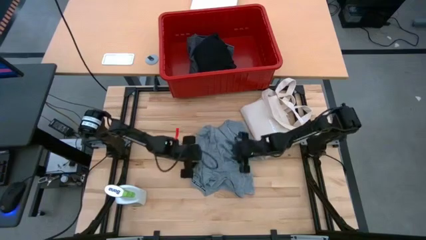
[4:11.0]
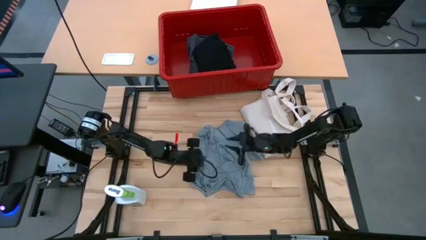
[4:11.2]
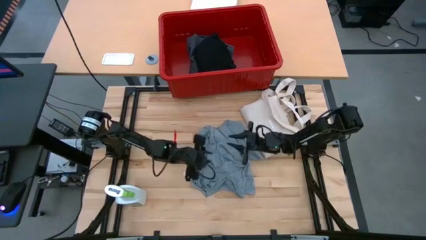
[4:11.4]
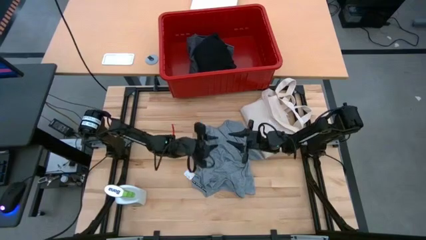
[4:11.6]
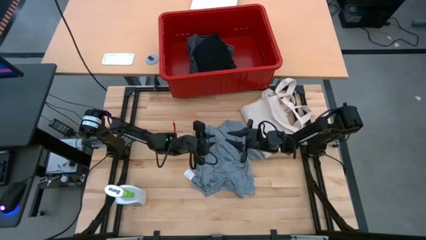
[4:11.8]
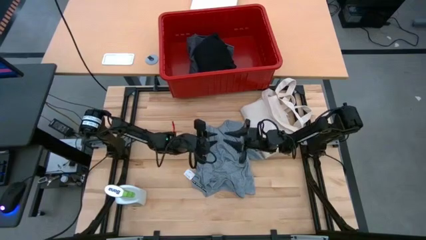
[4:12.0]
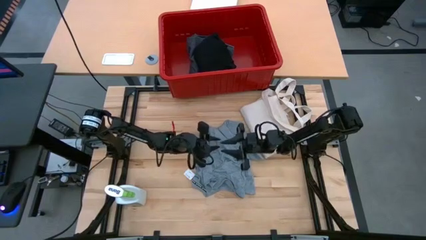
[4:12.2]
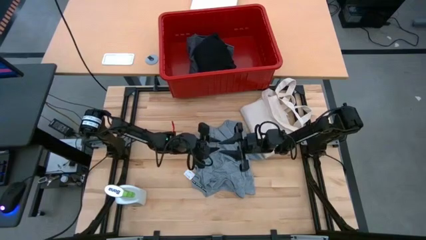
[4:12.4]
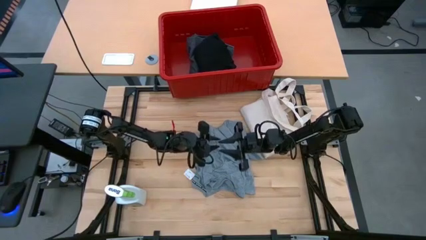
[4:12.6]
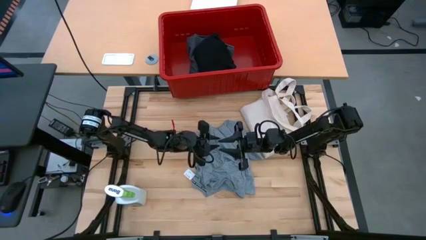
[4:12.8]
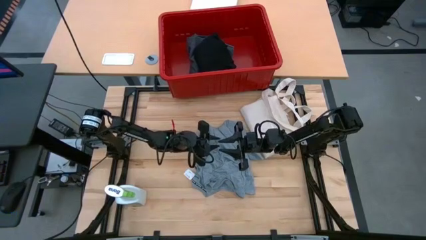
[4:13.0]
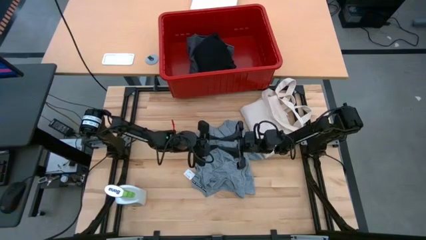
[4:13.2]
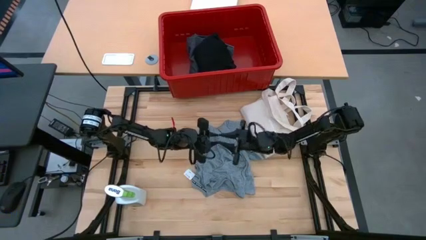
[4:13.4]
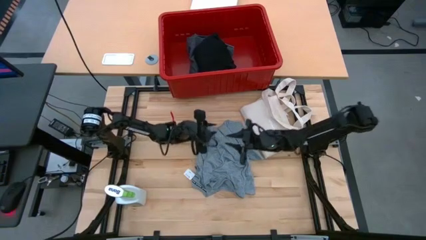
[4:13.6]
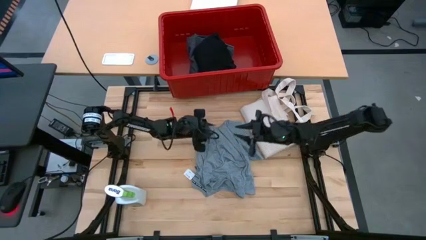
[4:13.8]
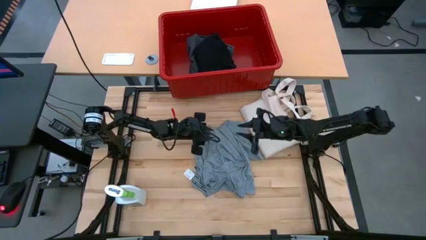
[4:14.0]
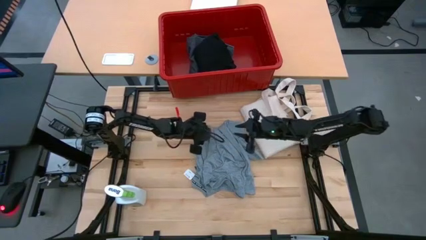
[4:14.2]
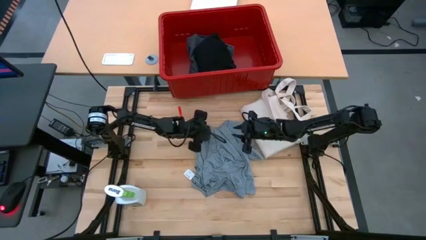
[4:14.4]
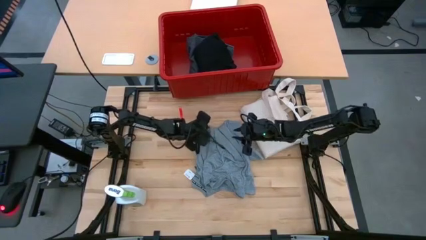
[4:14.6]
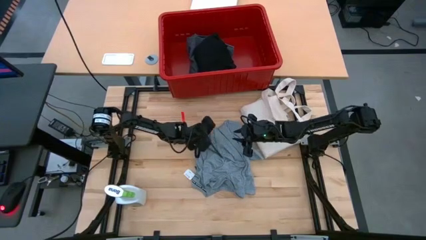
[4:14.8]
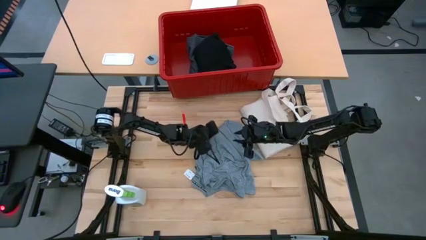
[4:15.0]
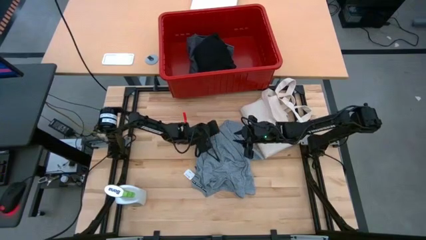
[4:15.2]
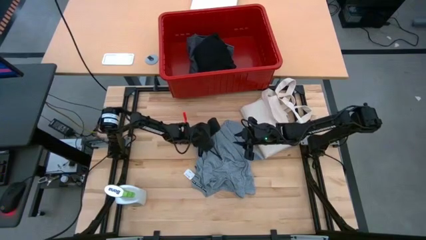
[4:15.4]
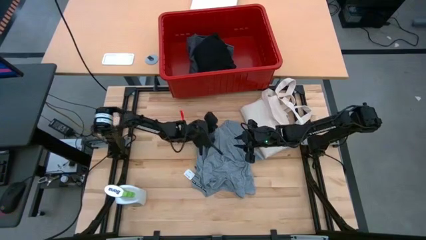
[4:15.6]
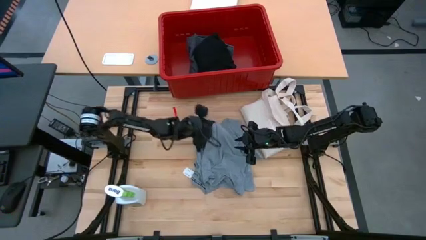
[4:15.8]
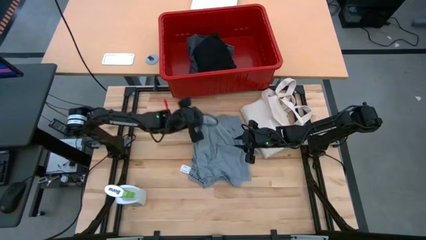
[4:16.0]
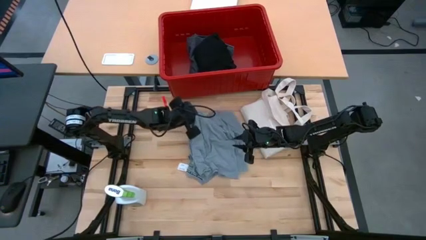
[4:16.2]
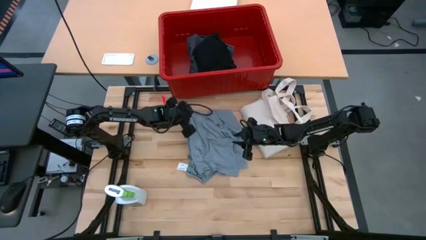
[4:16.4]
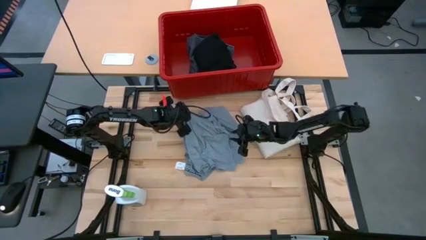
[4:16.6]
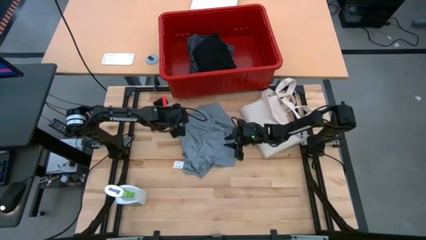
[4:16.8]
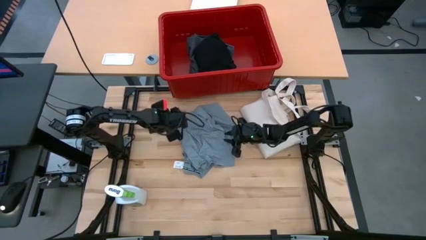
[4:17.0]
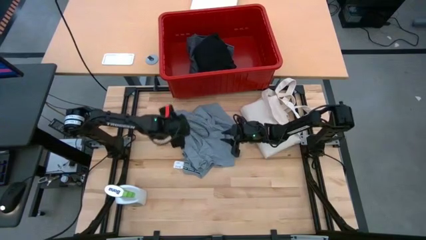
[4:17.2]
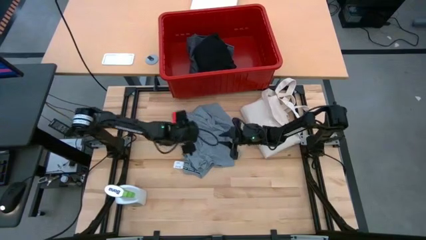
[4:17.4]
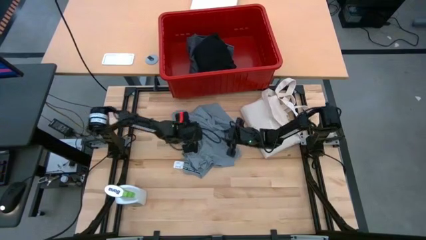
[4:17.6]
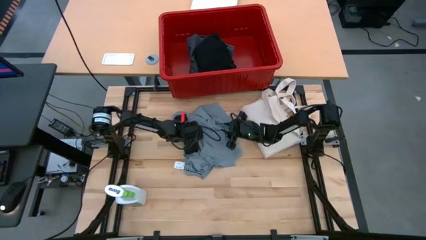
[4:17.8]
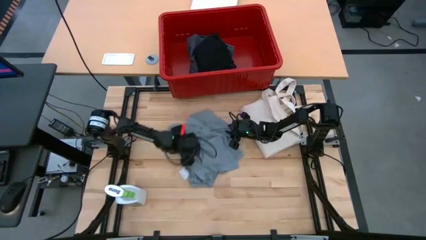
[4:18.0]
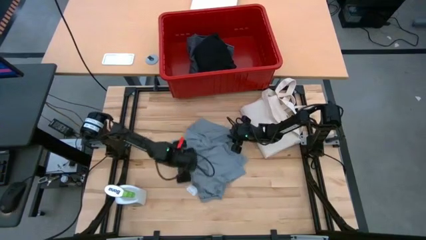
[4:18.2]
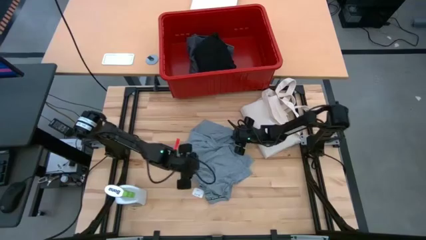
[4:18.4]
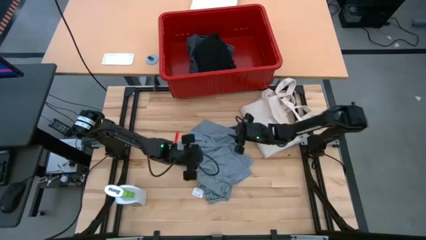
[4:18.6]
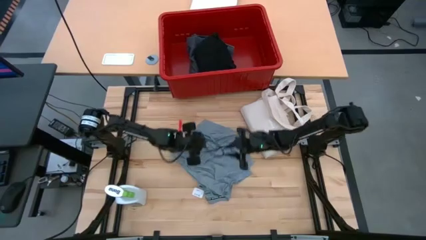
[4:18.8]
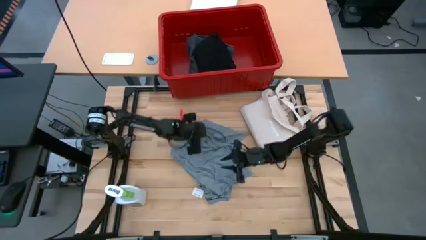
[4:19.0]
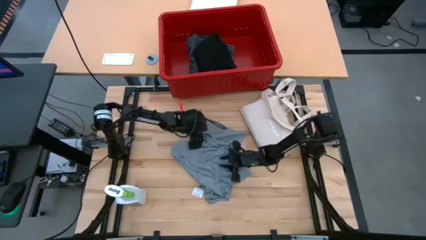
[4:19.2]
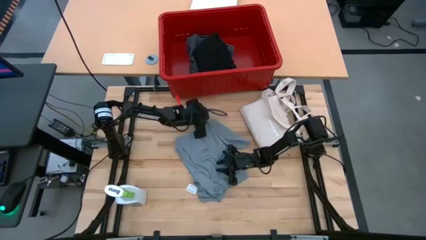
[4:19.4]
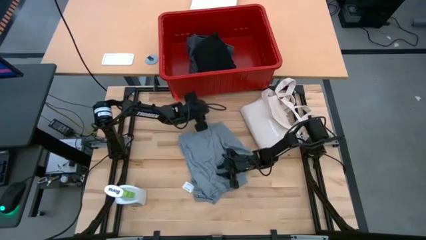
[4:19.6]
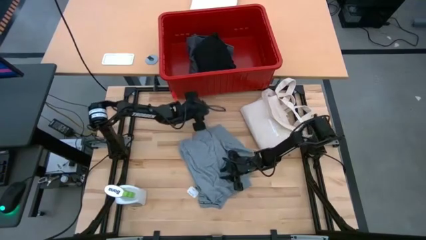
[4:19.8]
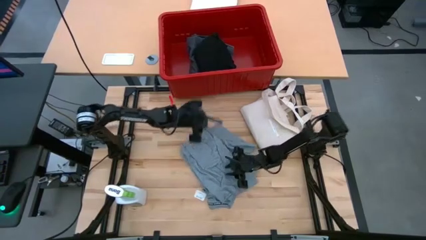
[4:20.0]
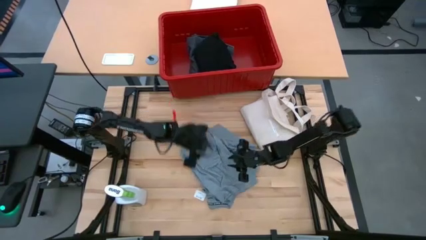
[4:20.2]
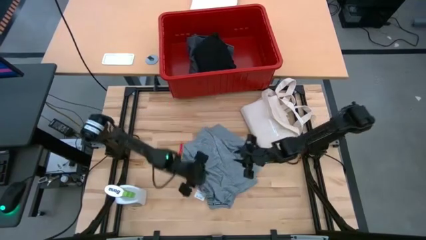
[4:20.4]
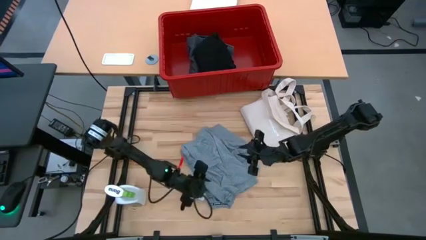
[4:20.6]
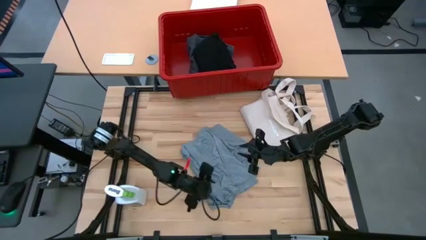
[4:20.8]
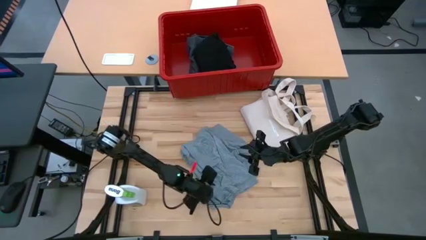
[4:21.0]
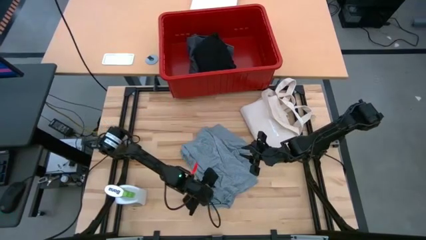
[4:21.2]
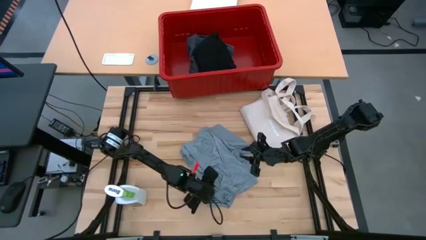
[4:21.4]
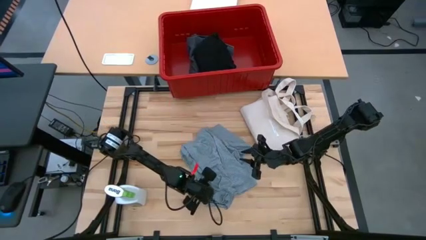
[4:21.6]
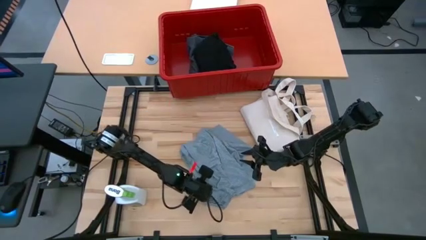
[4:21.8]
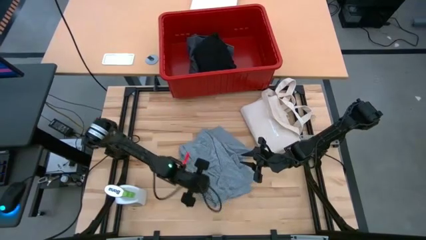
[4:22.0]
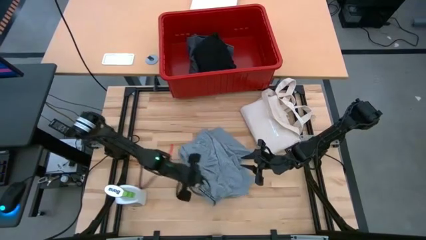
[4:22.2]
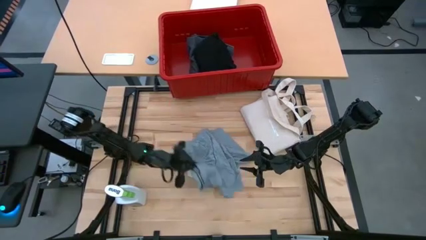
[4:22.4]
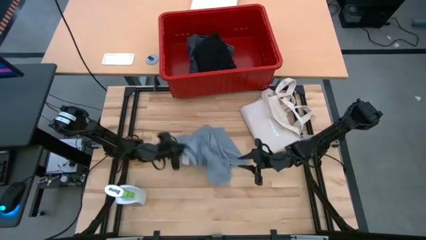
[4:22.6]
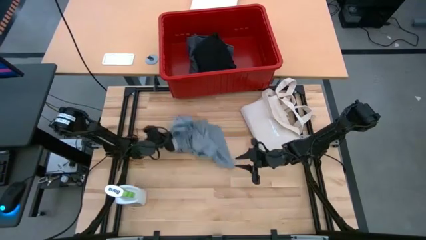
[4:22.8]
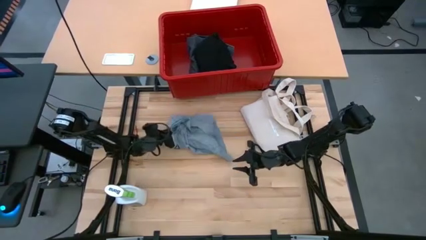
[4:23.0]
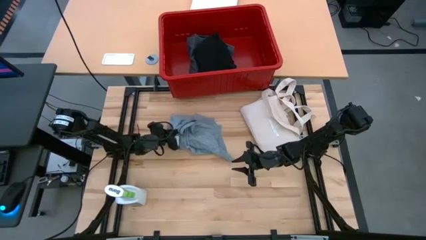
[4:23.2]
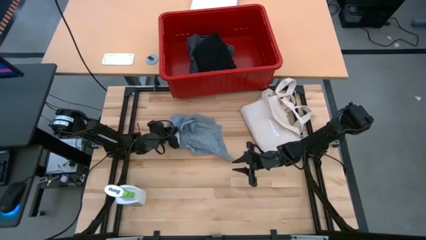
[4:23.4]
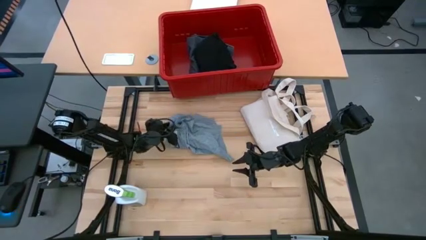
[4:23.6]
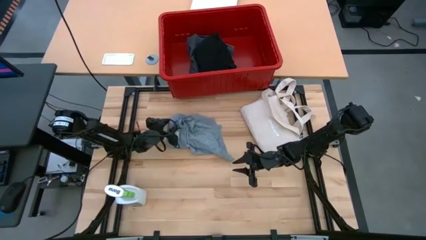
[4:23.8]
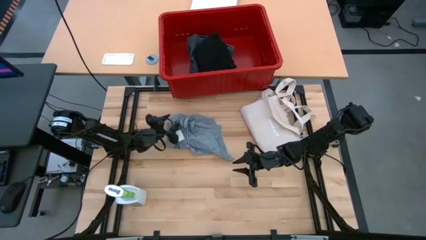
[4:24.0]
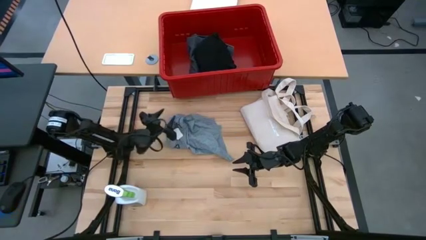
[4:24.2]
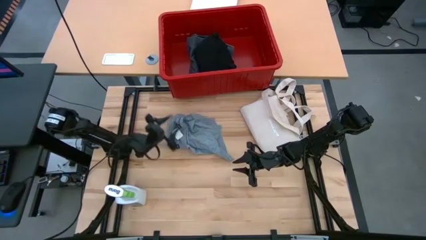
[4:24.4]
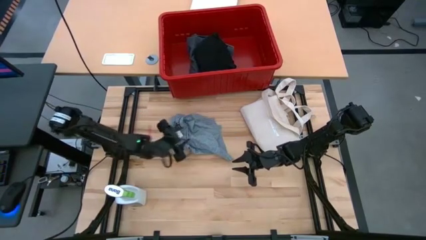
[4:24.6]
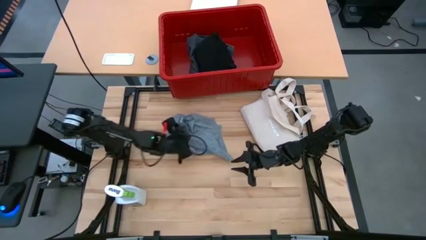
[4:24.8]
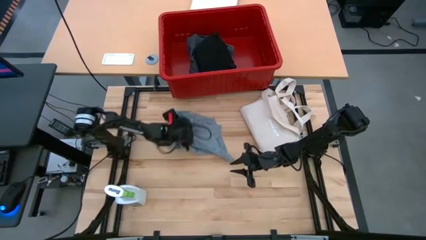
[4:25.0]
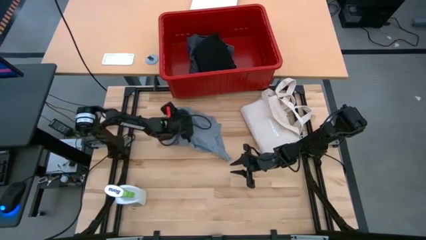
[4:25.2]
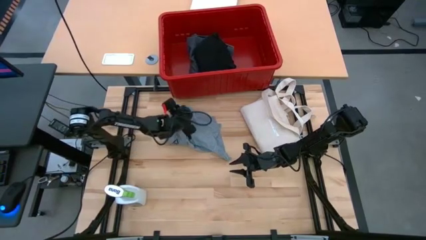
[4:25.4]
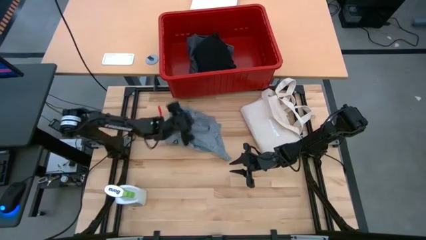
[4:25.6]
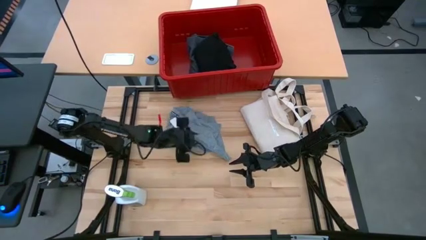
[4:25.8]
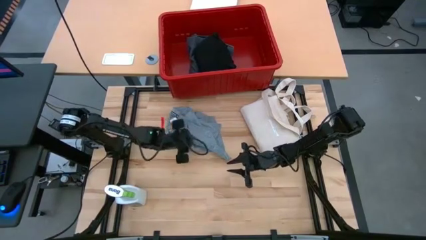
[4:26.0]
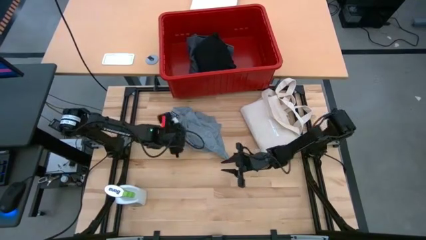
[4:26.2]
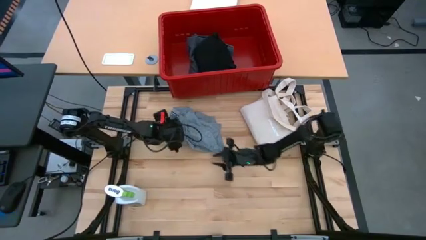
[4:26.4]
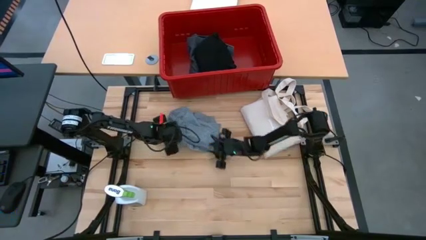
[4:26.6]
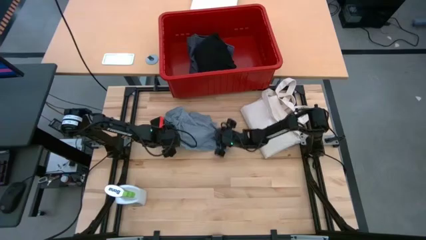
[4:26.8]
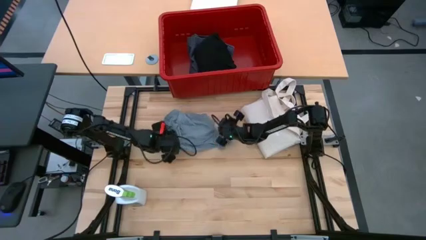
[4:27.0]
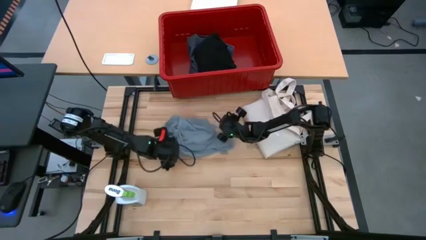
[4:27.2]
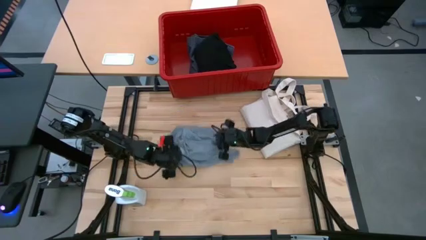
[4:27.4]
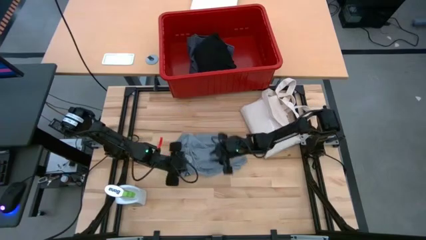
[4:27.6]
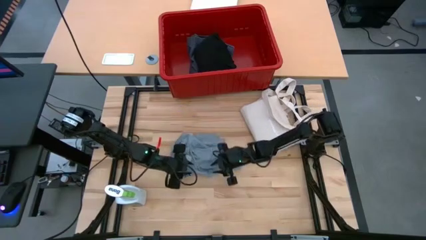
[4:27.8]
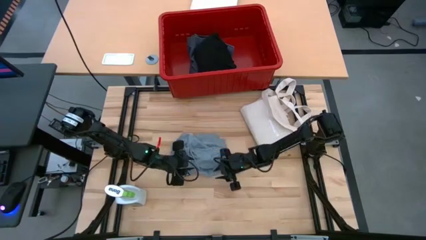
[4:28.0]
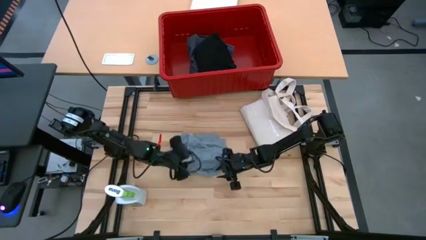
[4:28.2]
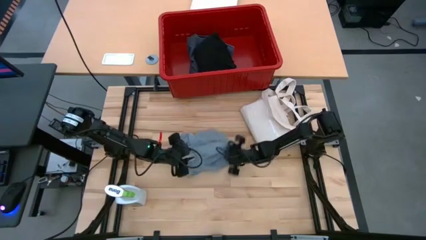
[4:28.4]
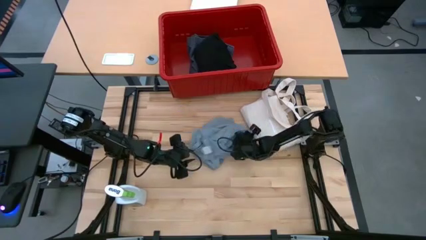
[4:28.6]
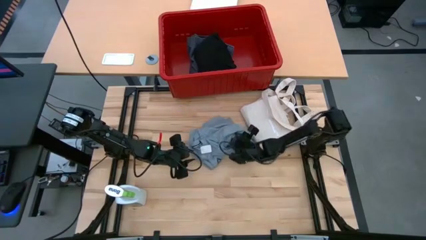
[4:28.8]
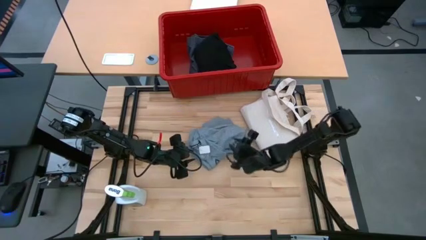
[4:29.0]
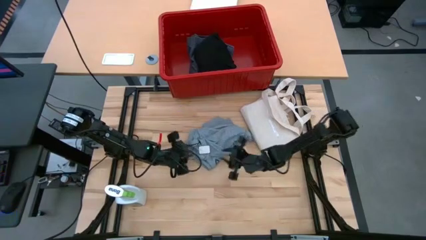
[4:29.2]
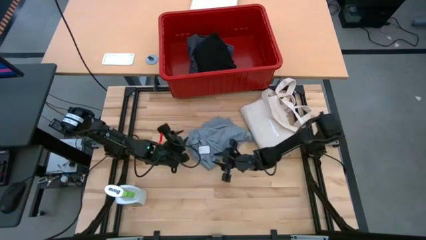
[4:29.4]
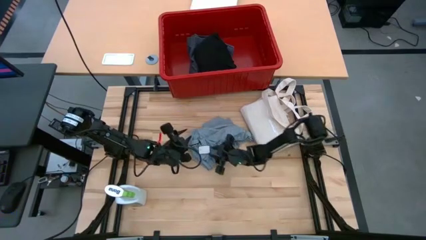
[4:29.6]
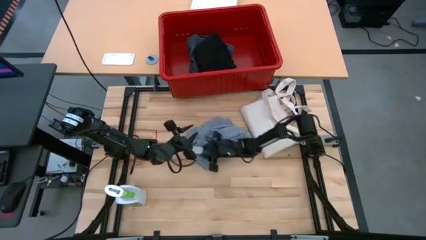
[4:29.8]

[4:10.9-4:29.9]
Task: Fold Laundry from Bin
Fold the gray shirt
